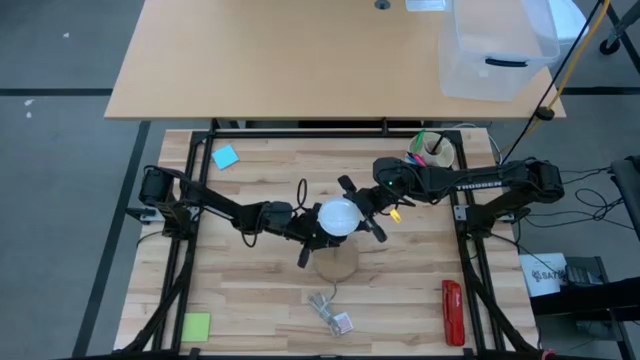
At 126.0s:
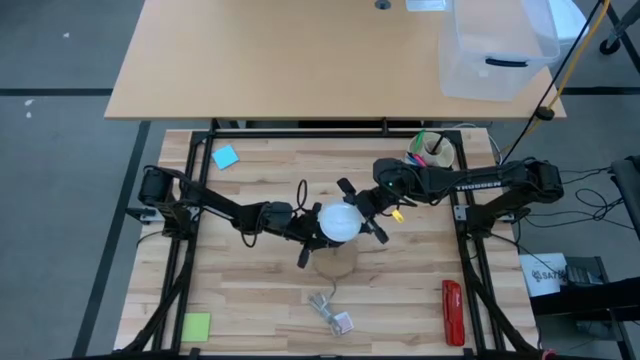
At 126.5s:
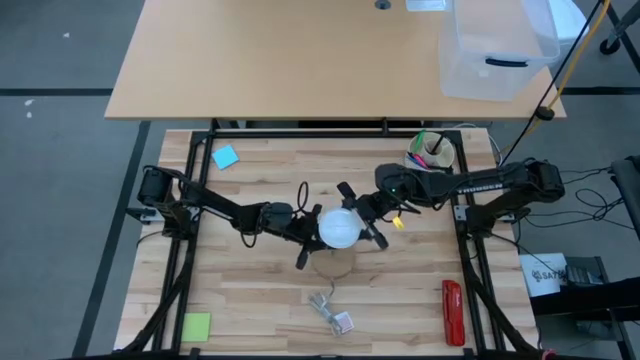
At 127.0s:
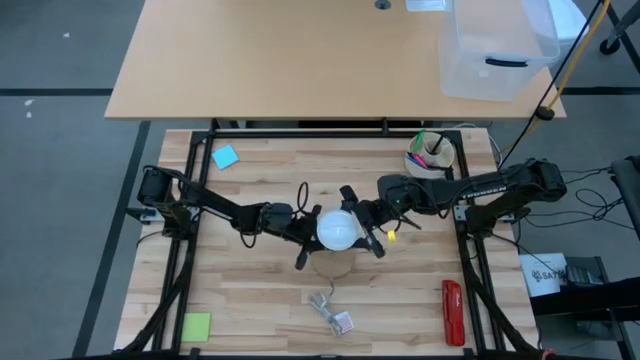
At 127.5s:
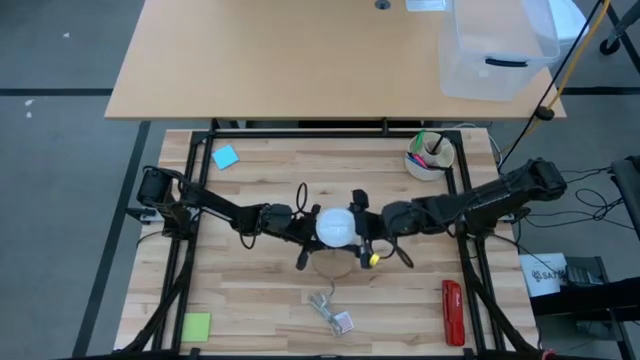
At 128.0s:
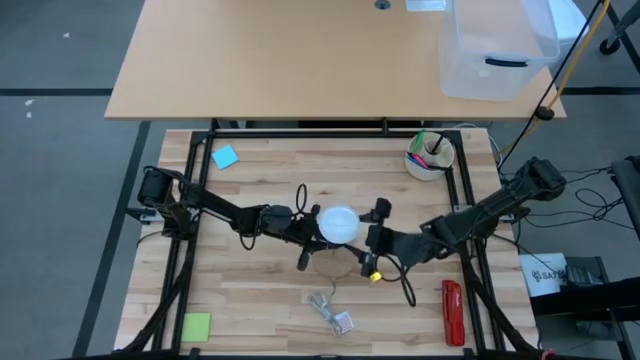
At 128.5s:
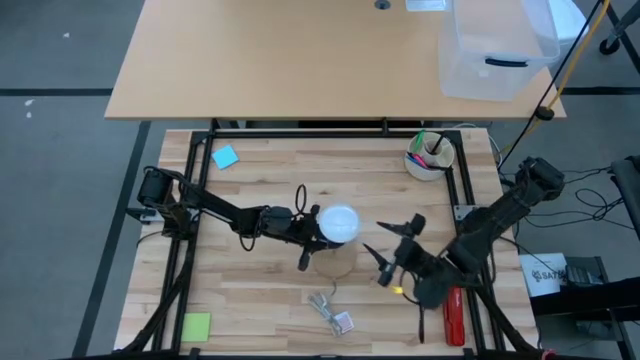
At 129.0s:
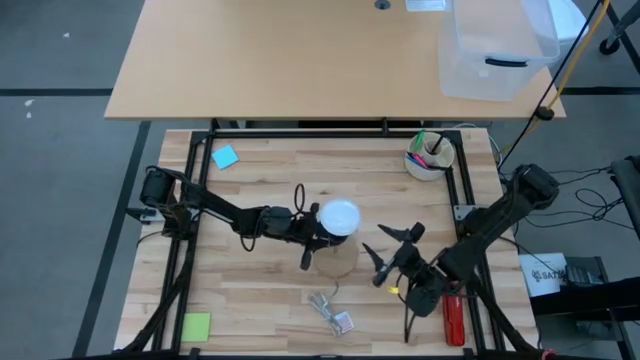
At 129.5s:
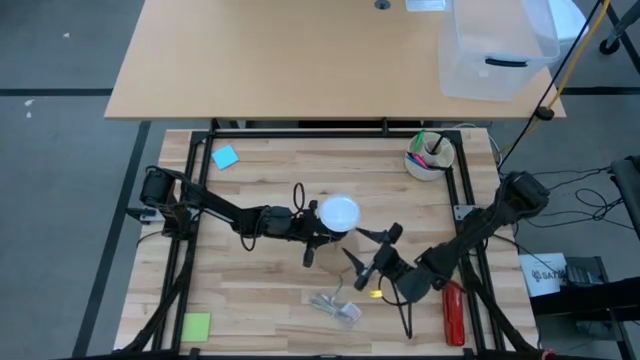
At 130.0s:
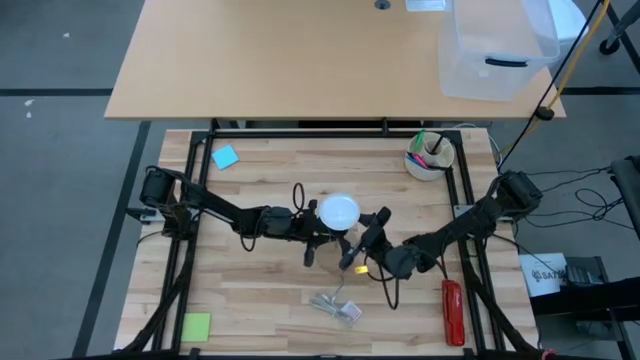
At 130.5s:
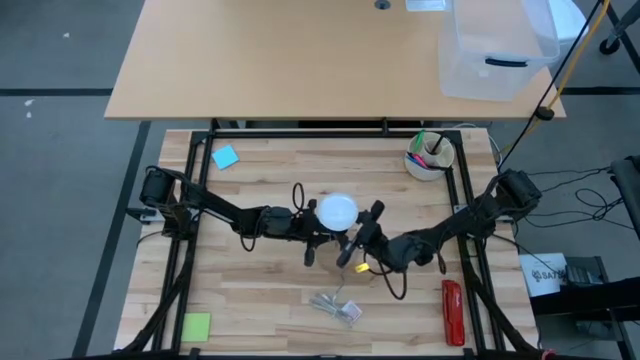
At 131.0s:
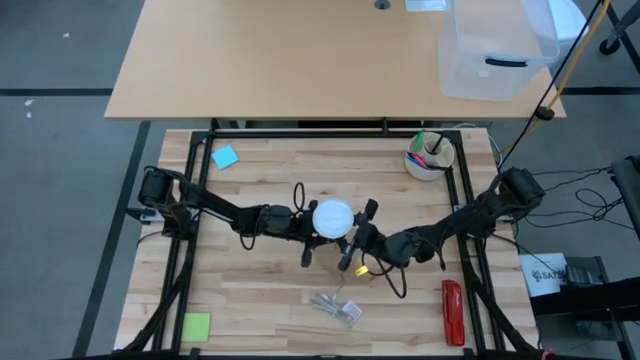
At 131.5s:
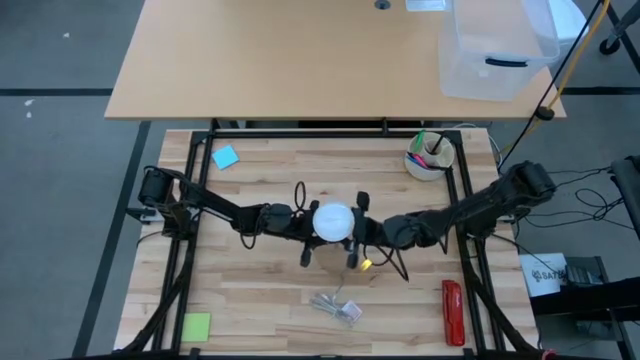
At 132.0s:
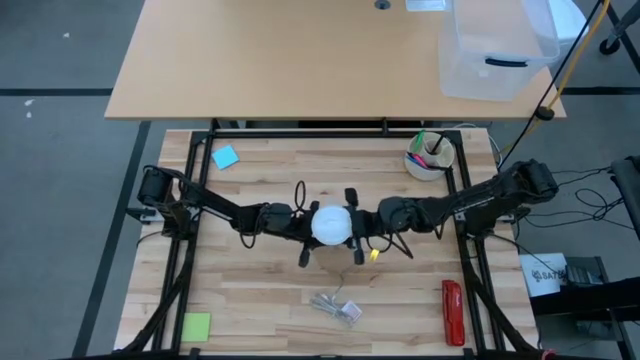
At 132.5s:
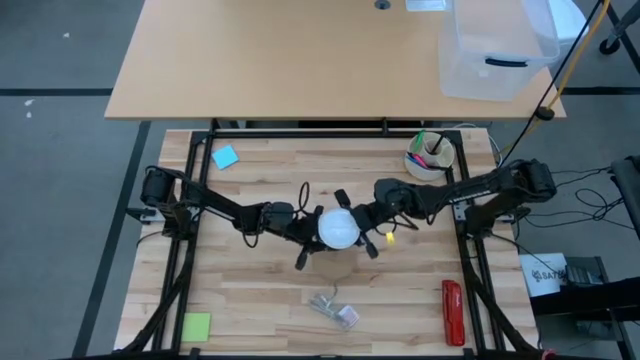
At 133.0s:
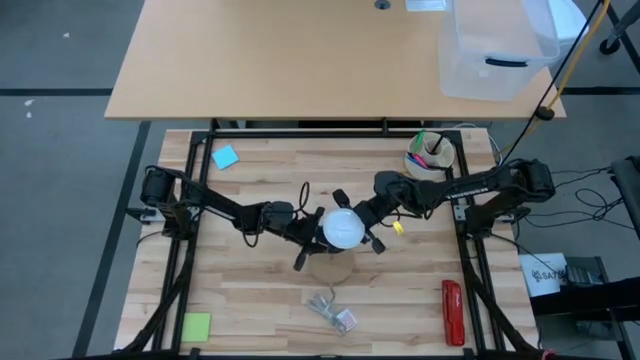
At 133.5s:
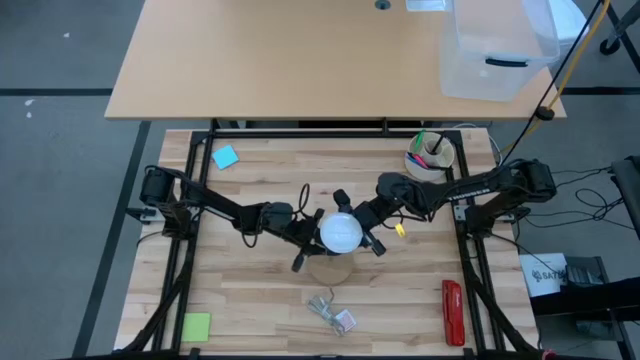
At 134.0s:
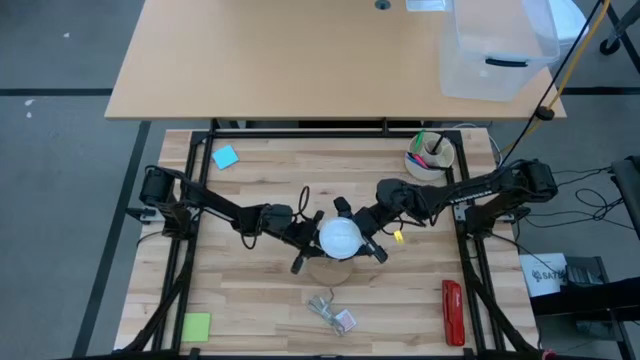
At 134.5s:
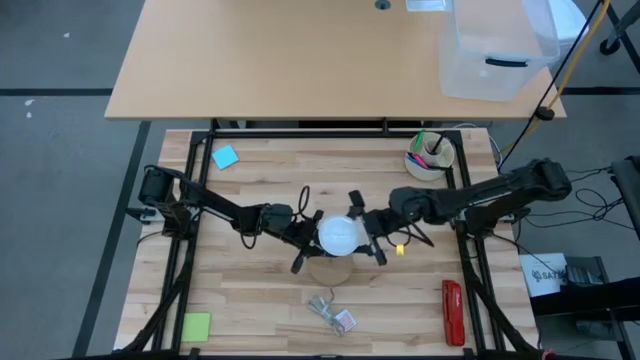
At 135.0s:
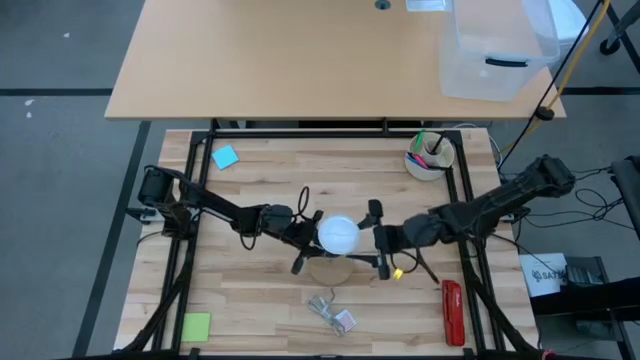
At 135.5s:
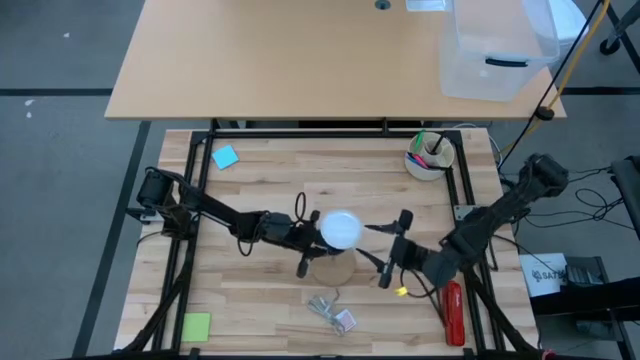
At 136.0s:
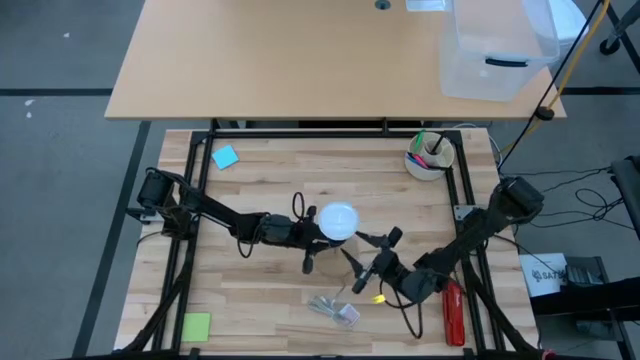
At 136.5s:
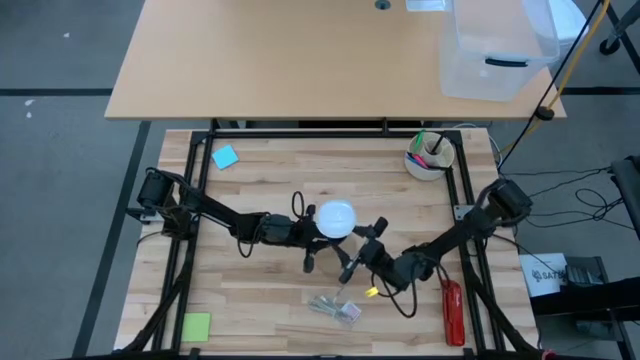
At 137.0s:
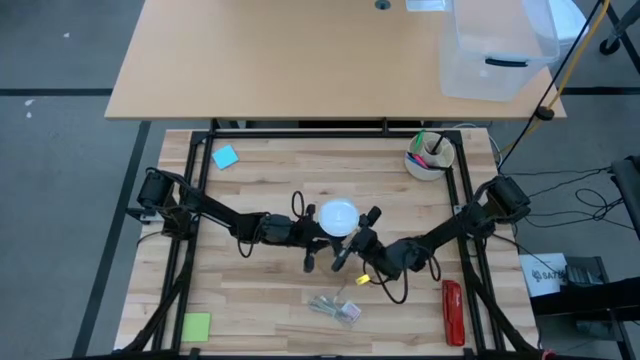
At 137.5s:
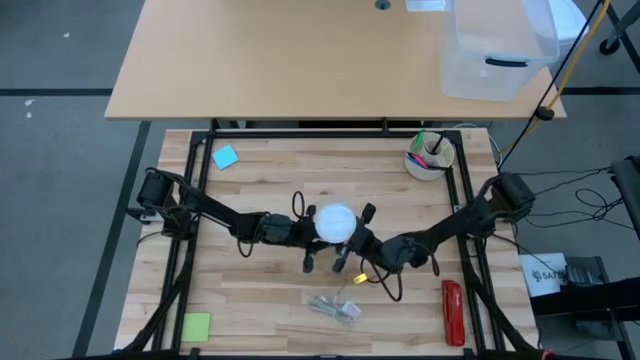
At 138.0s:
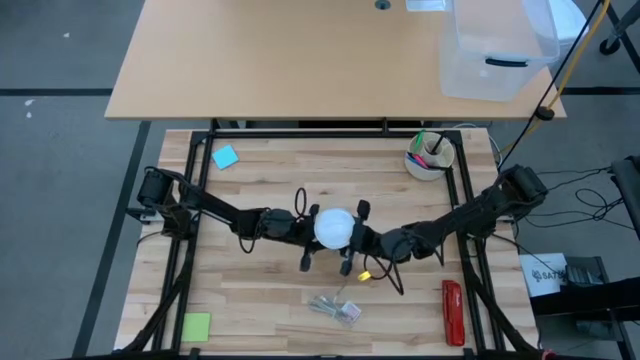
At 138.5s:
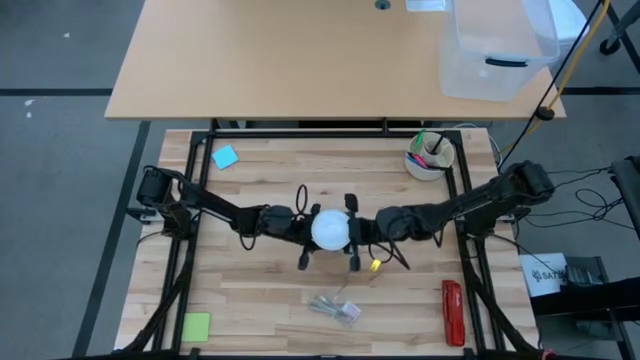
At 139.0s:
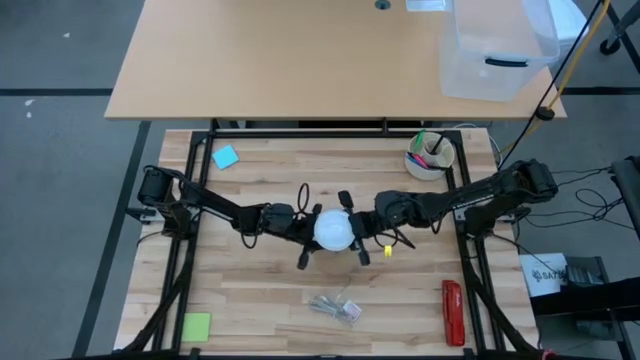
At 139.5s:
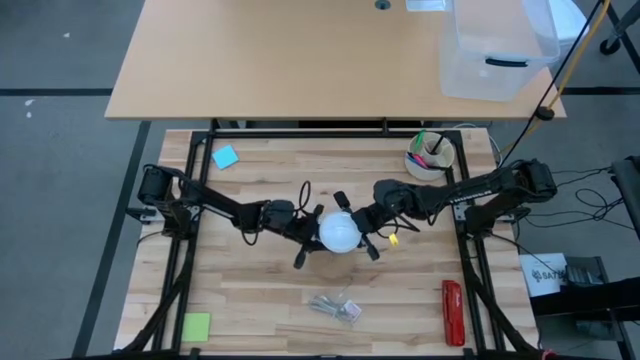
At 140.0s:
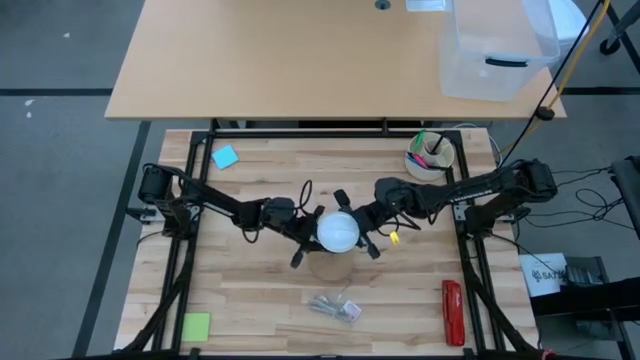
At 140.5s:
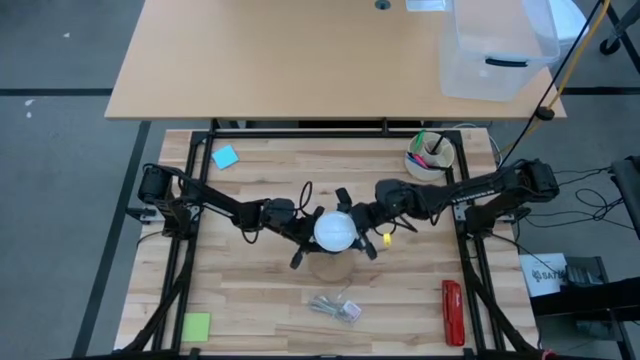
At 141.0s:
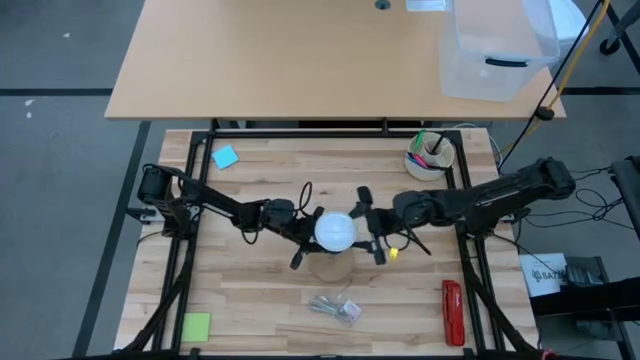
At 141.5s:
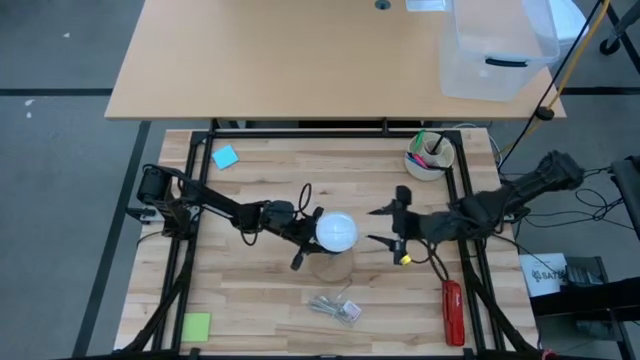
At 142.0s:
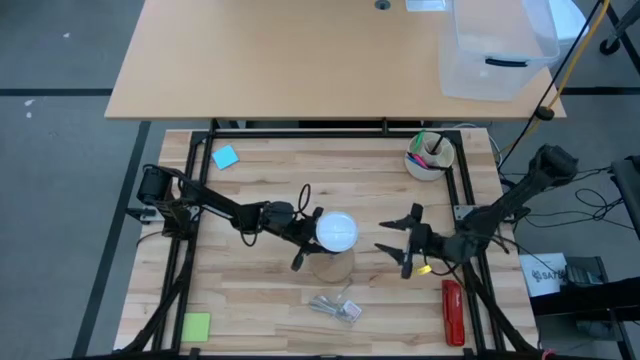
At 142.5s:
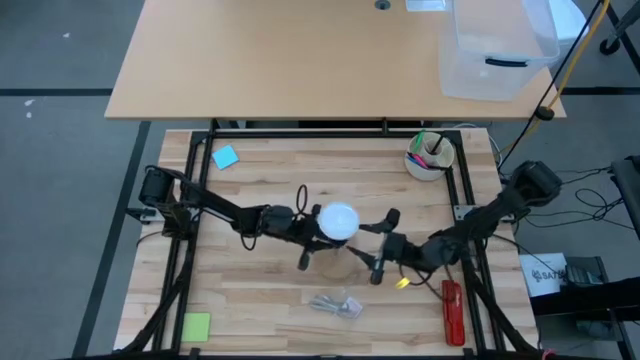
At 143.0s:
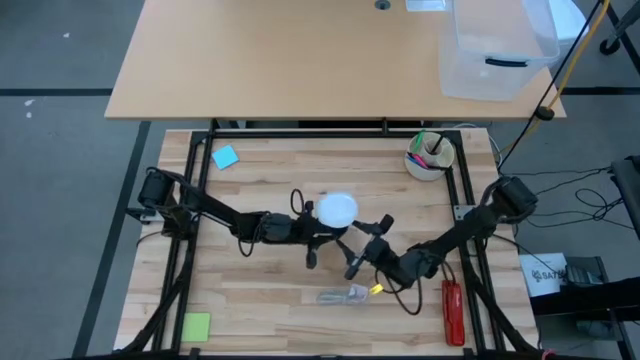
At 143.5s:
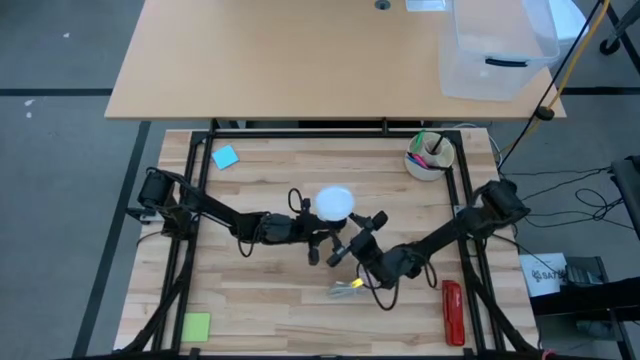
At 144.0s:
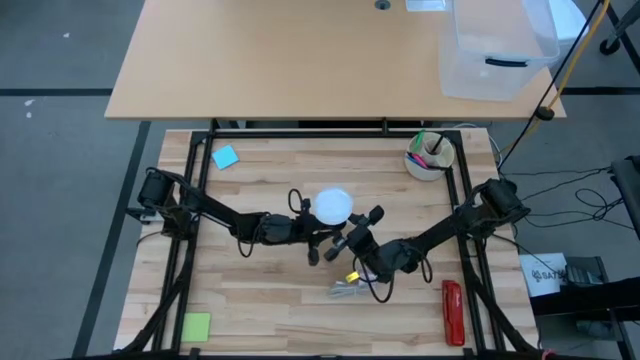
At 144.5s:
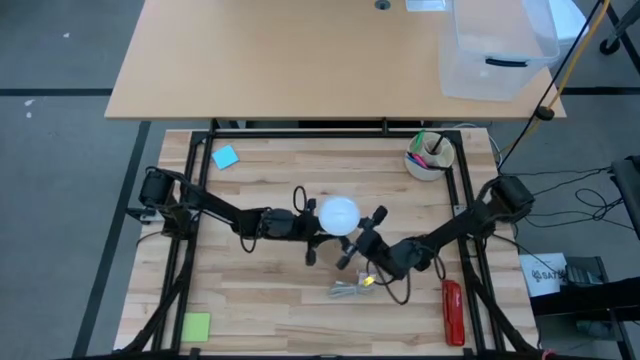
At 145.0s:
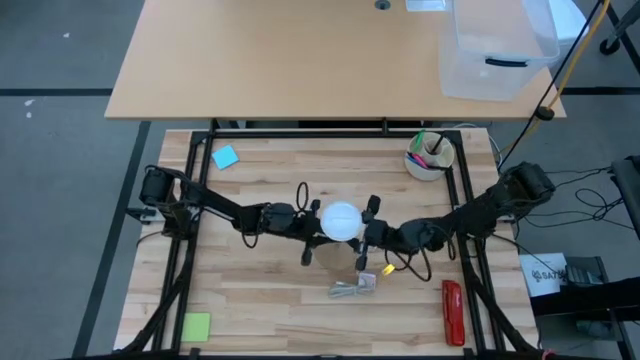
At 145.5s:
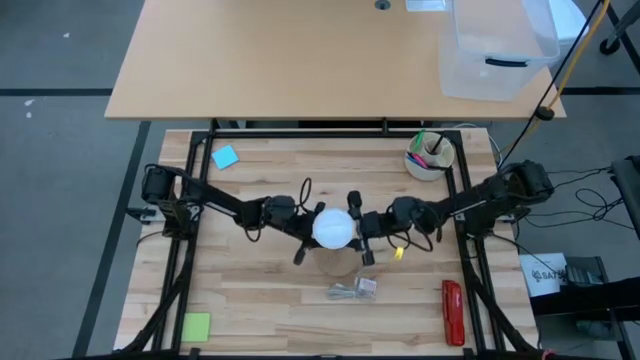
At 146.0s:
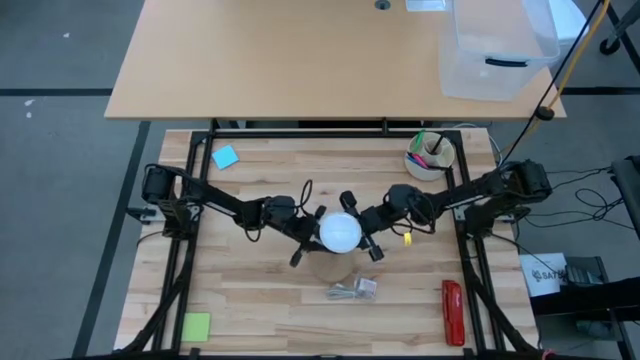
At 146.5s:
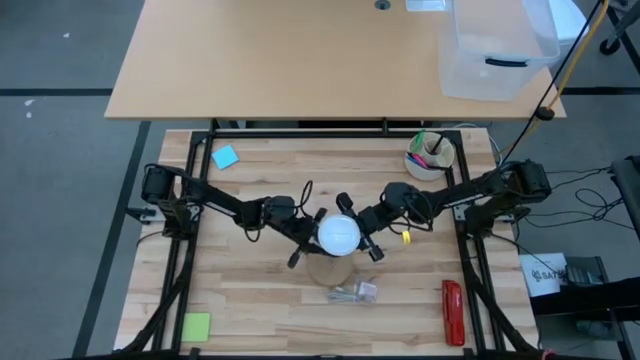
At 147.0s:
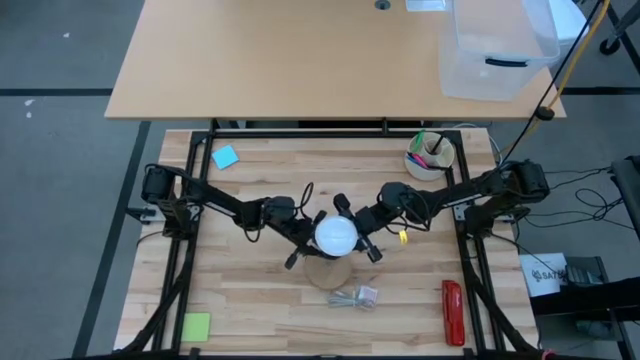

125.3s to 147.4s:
Task: Screw lightbulb
Remove the lightbulb from the lamp
